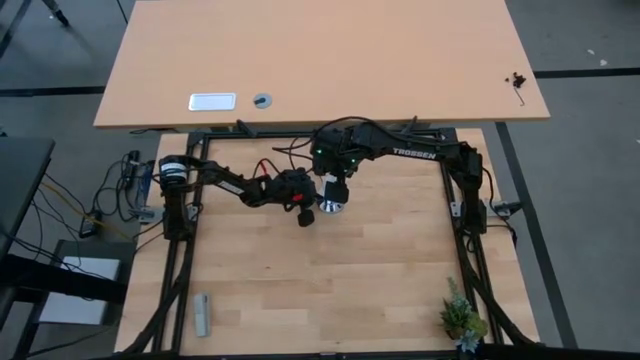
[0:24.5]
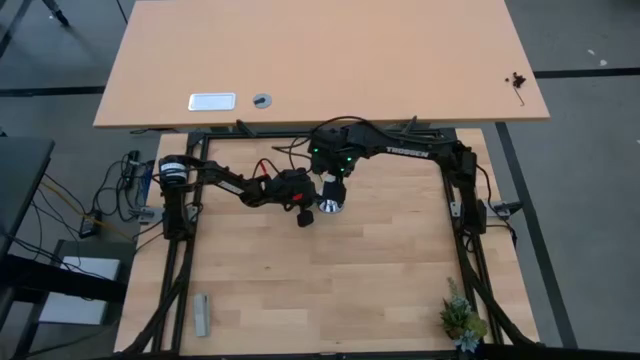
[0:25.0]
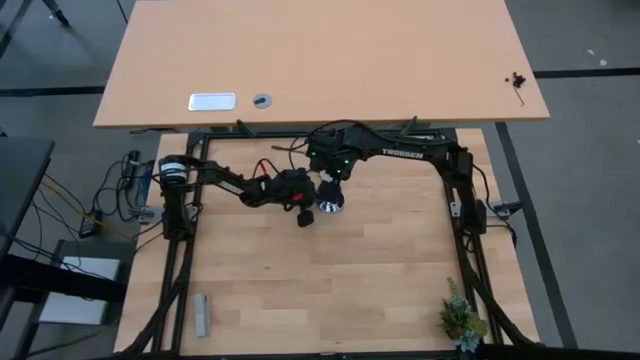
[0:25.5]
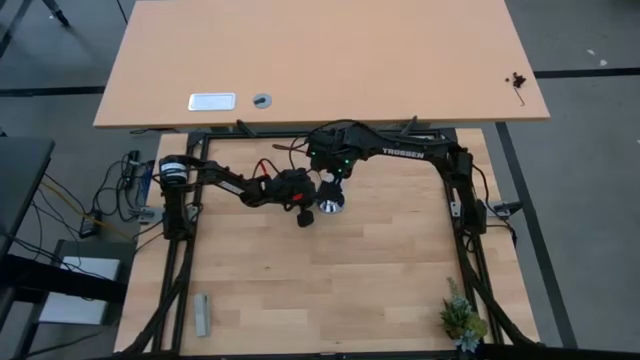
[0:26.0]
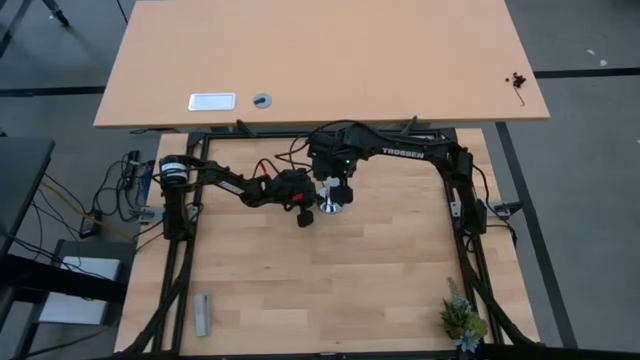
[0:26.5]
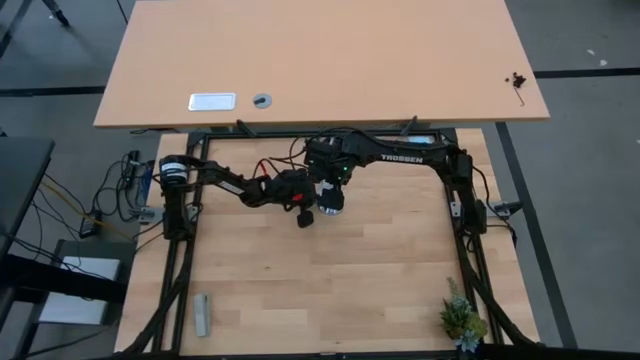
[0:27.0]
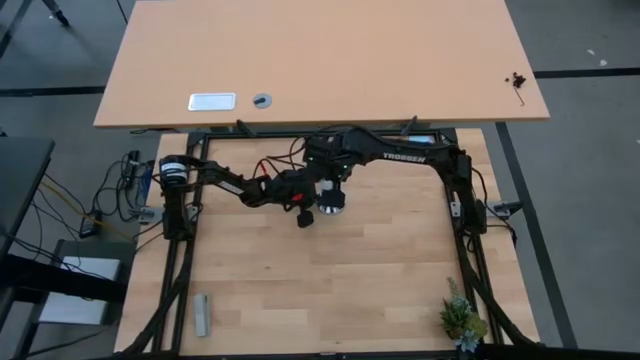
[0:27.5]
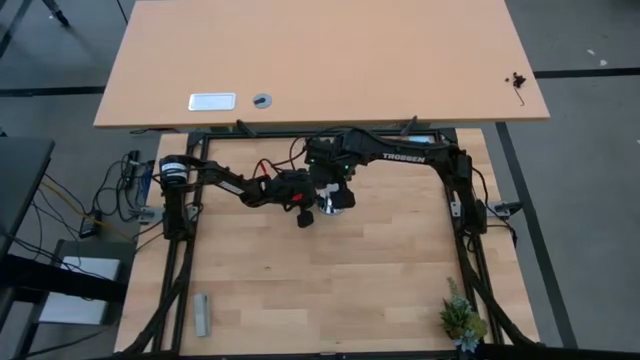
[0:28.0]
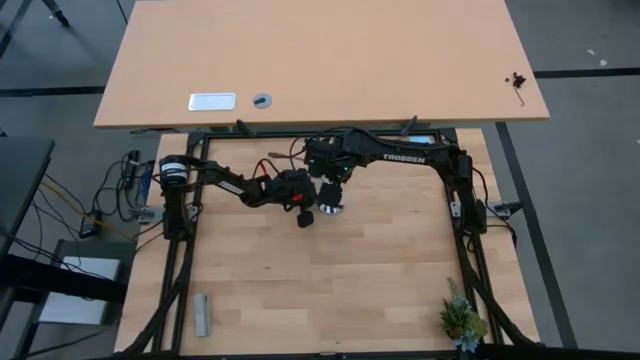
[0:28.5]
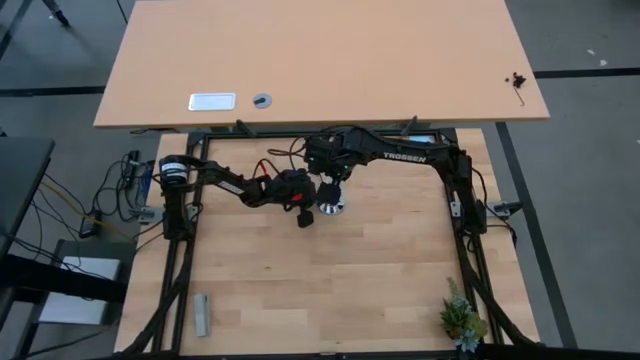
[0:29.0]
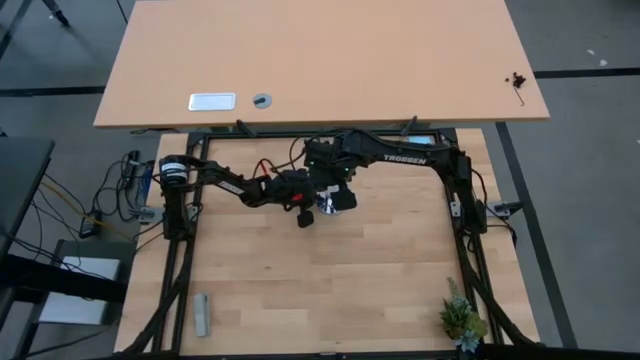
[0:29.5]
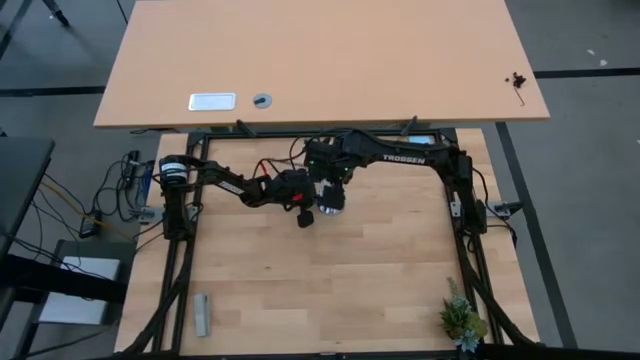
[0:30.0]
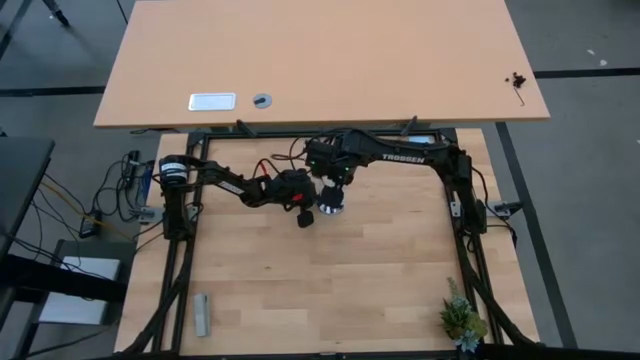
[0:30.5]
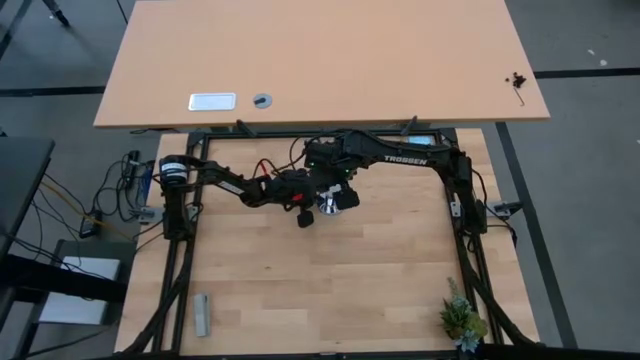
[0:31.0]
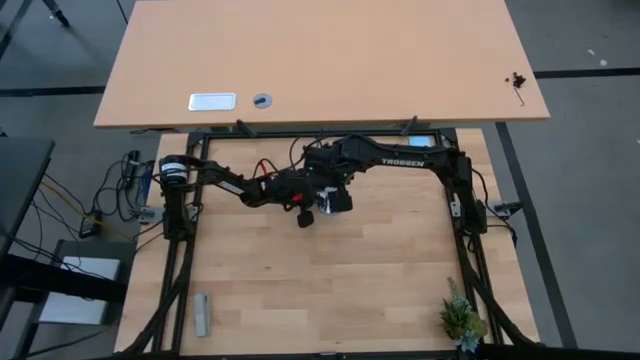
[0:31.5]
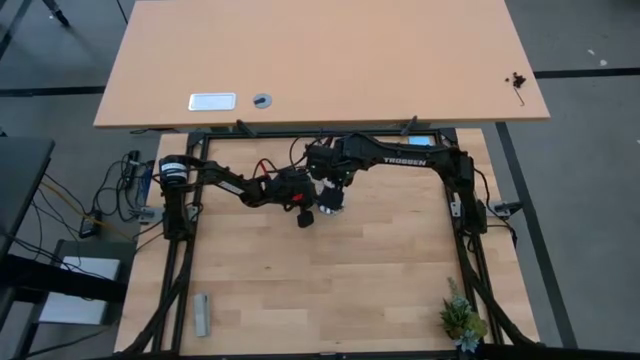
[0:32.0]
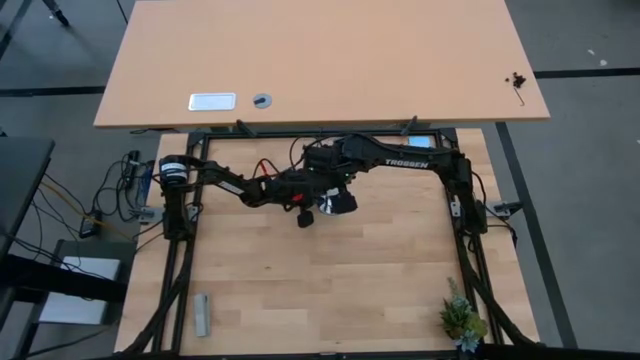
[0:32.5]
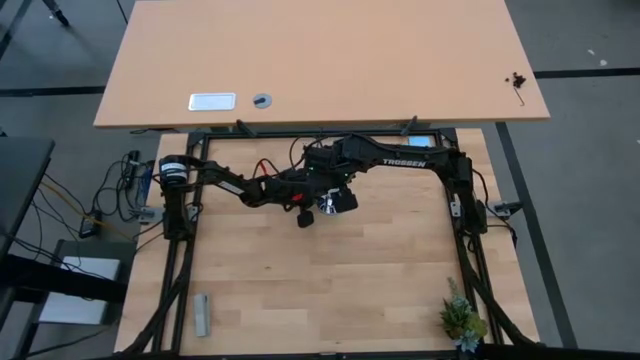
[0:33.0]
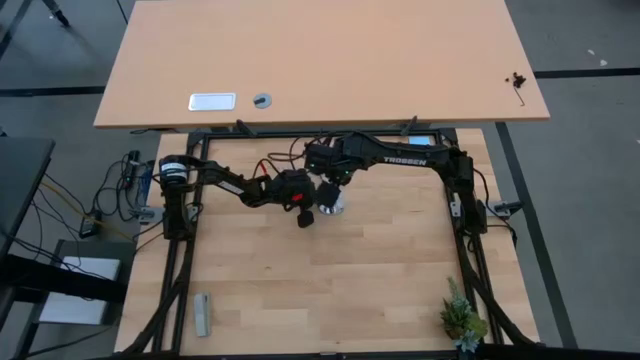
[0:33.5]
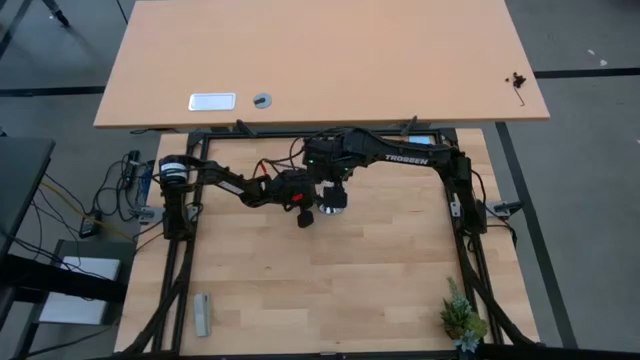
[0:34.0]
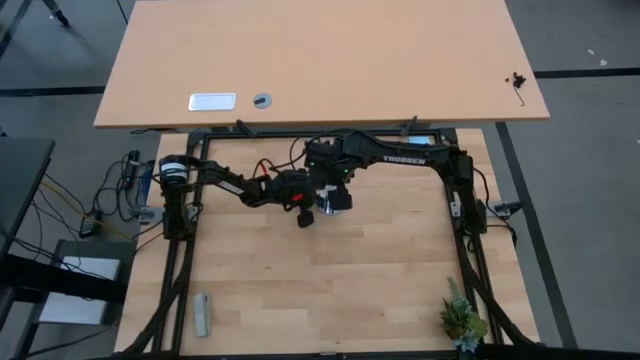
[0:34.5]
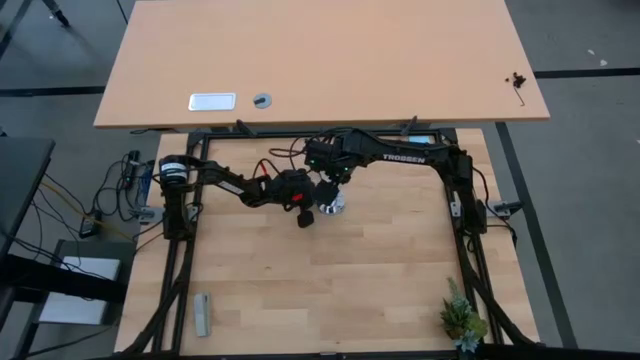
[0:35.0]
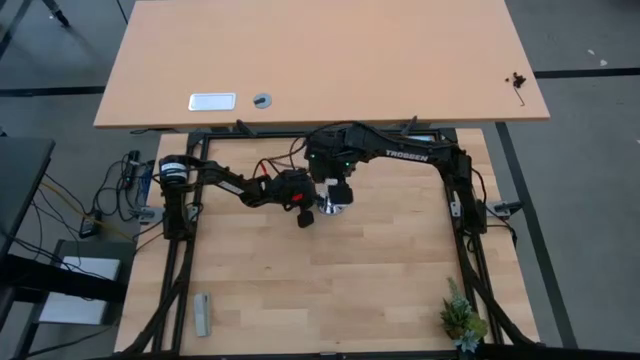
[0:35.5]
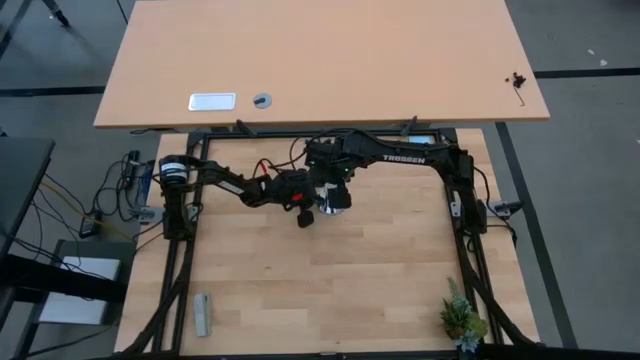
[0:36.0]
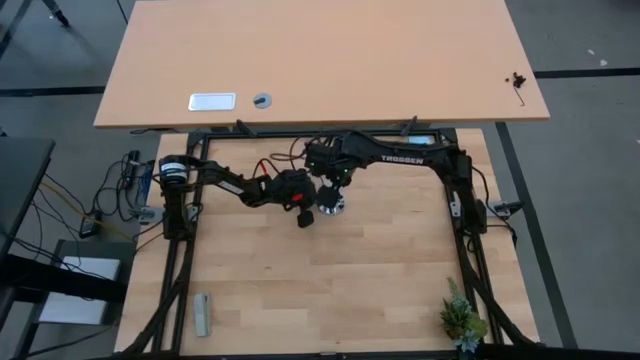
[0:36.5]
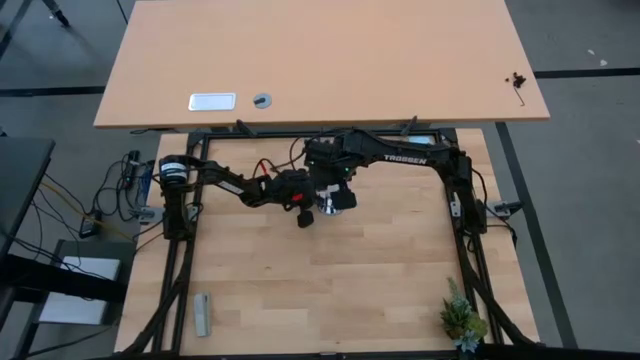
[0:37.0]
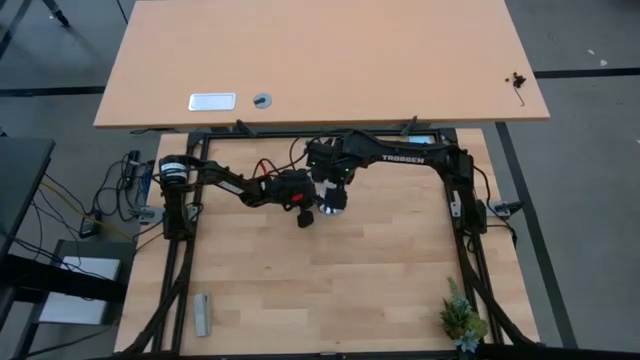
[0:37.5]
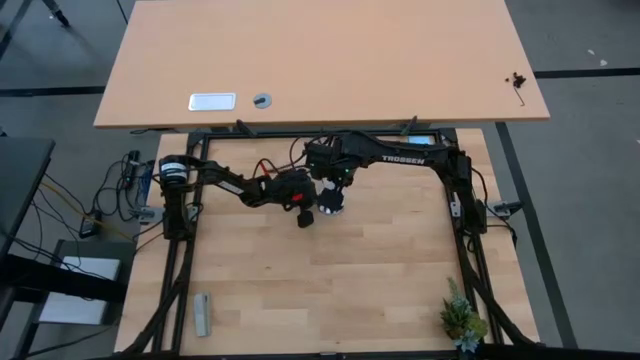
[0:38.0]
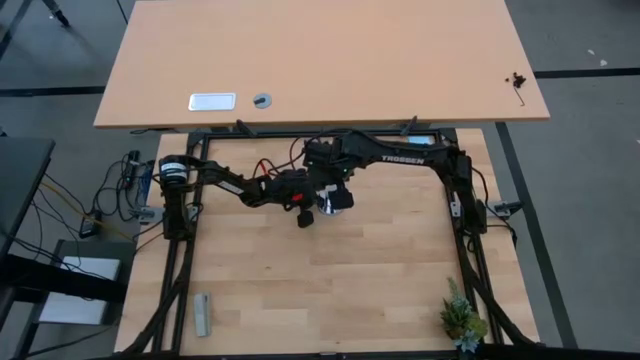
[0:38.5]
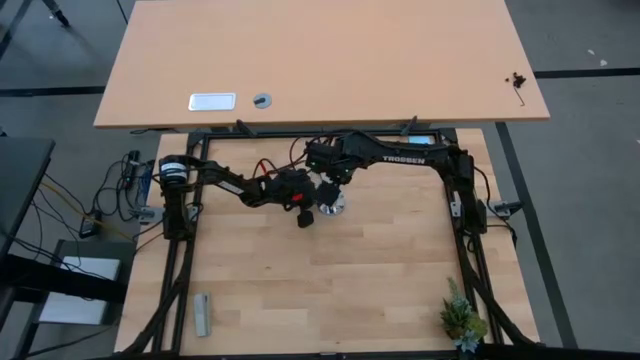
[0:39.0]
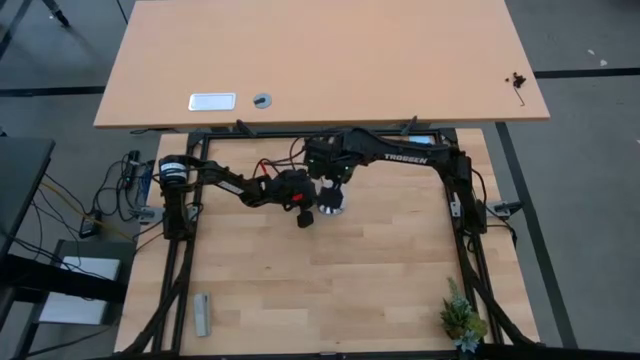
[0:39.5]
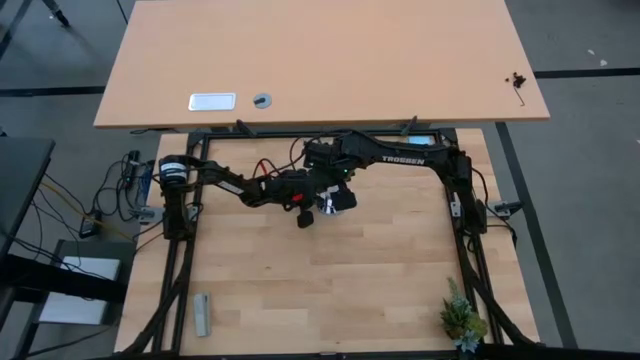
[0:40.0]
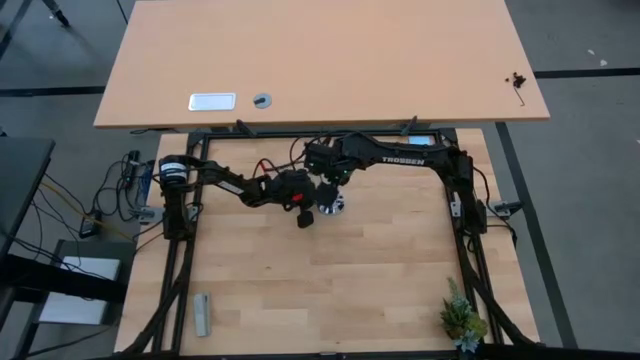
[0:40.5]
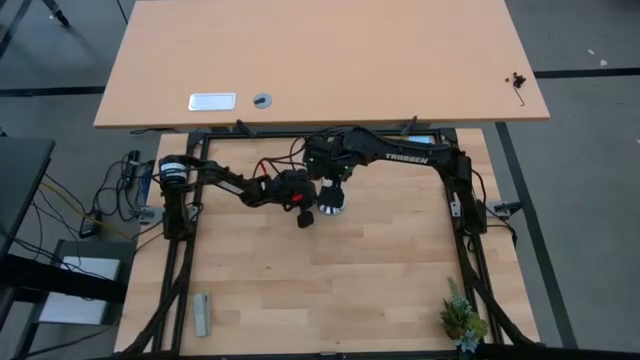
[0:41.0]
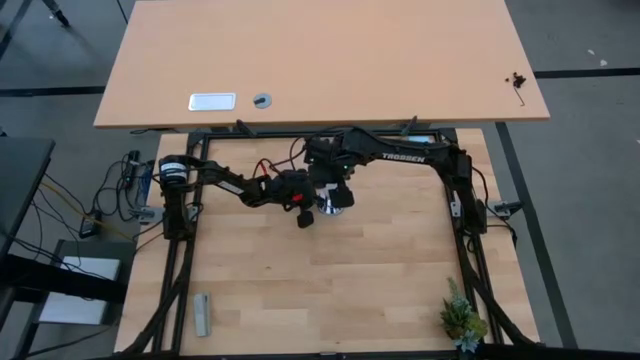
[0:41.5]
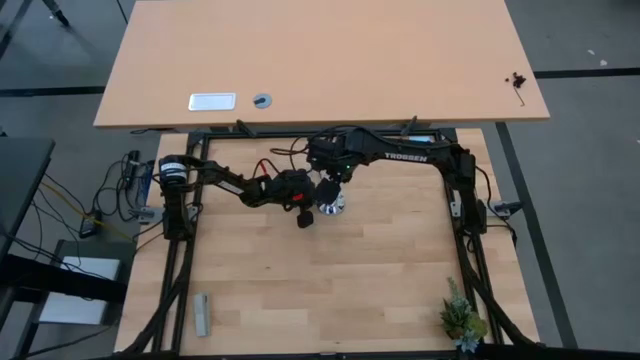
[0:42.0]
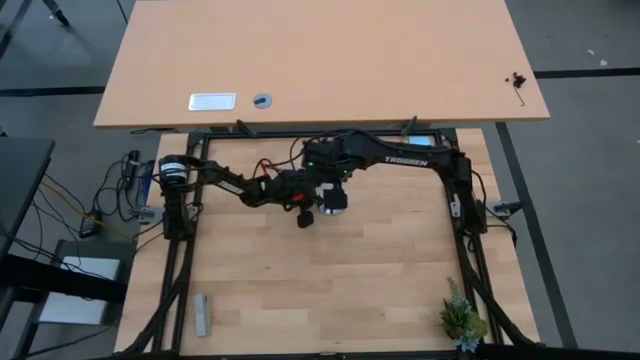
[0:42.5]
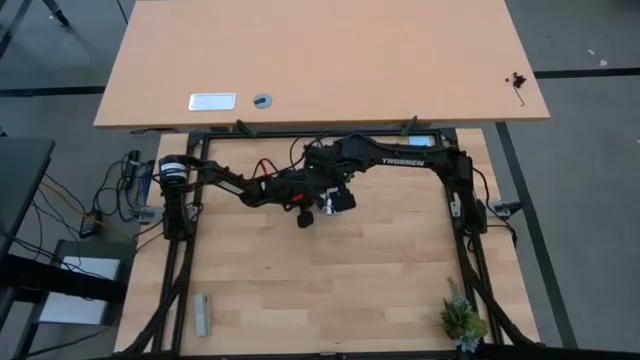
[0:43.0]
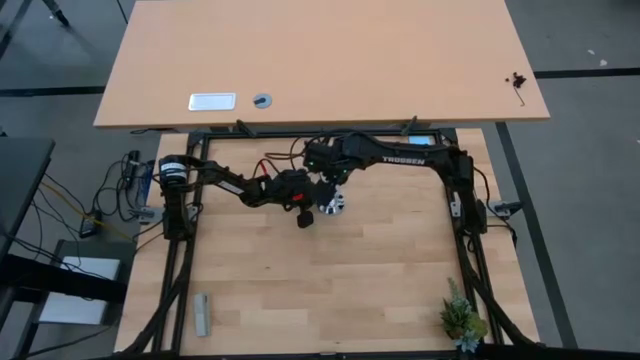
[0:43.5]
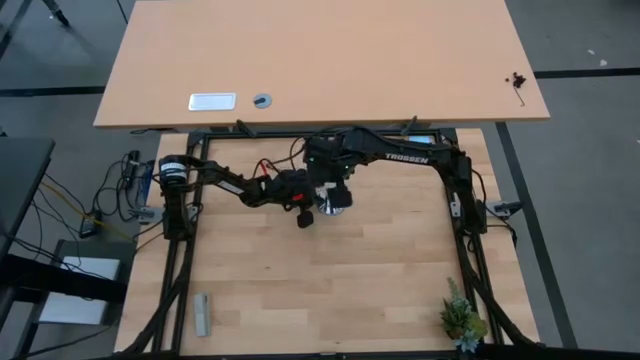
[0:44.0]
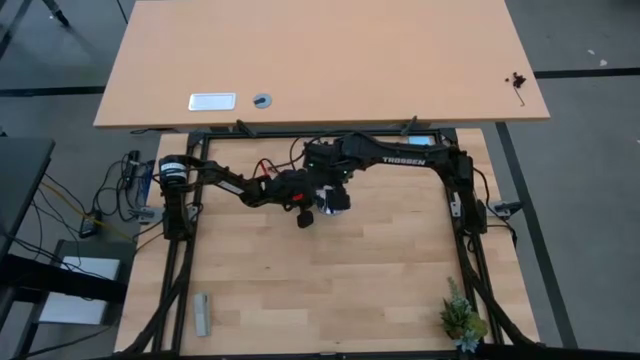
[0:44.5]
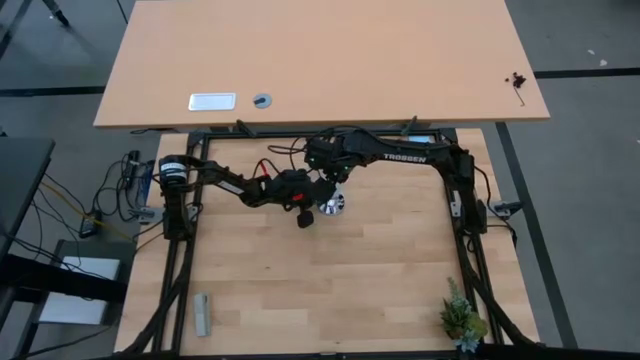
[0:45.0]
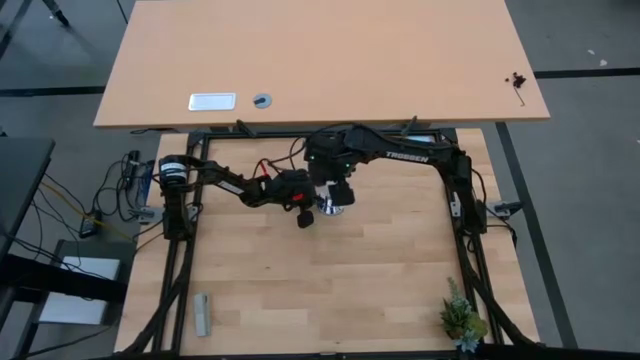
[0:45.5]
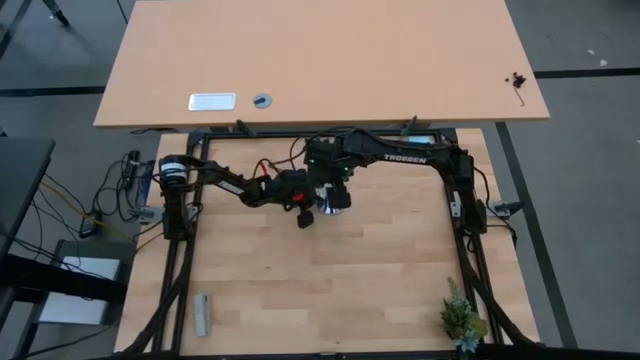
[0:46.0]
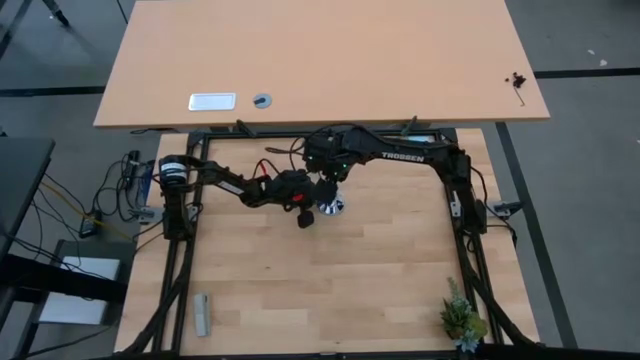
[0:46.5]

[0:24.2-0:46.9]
Task: Screw lightbulb
Insert the lightbulb into the lamp socket
